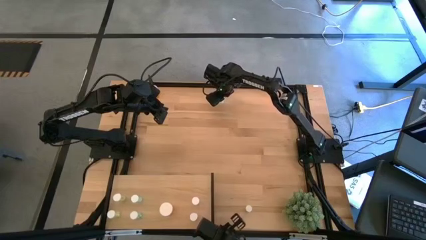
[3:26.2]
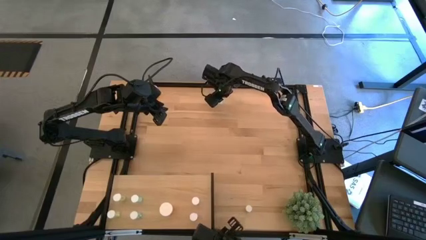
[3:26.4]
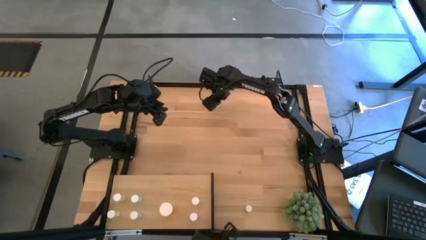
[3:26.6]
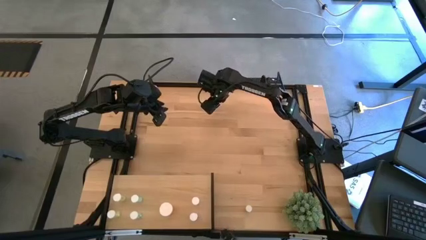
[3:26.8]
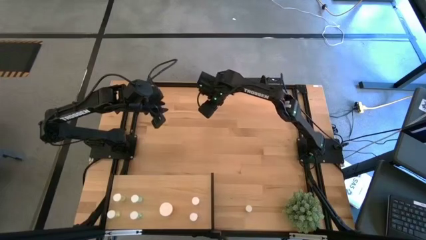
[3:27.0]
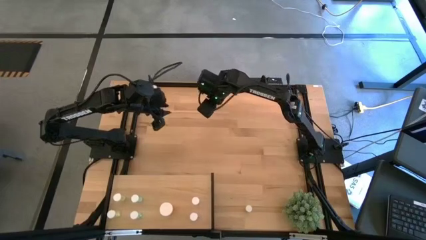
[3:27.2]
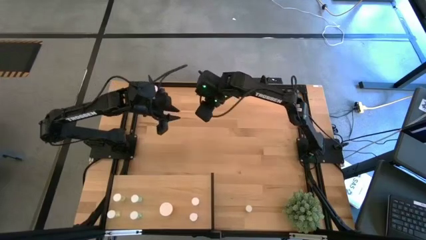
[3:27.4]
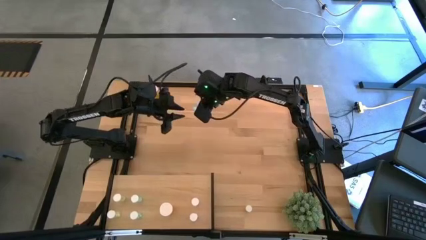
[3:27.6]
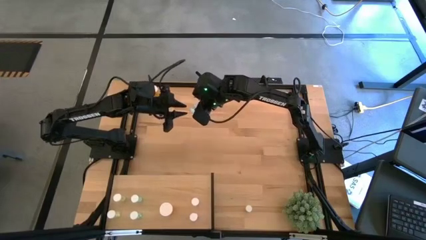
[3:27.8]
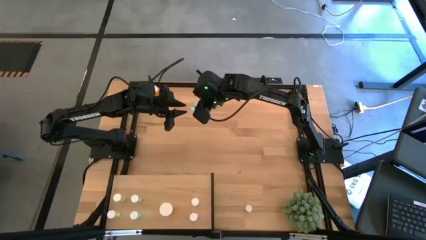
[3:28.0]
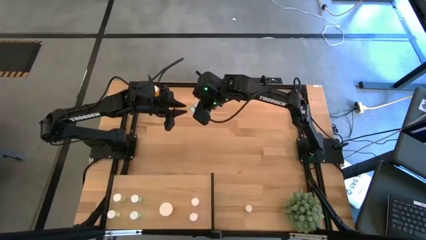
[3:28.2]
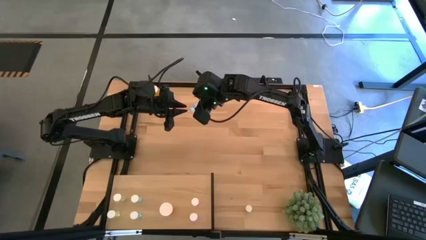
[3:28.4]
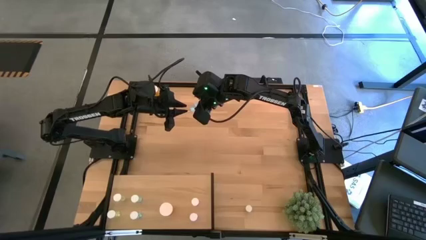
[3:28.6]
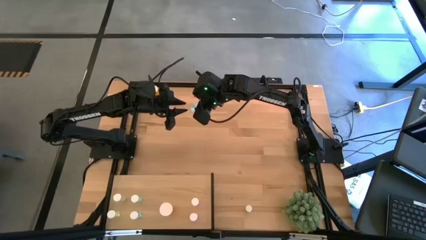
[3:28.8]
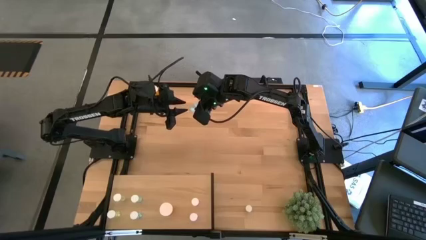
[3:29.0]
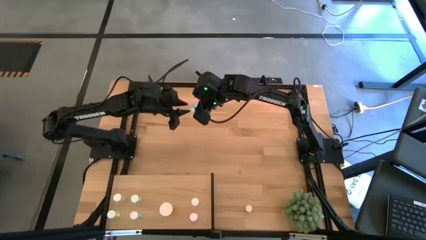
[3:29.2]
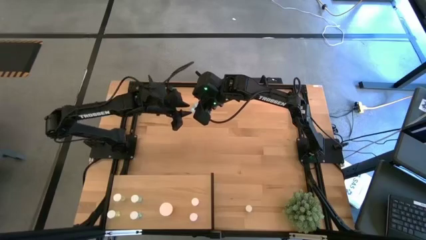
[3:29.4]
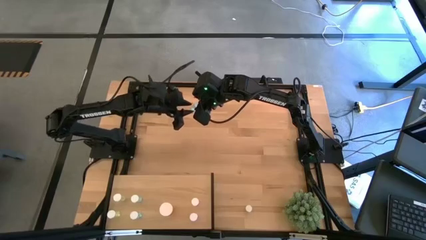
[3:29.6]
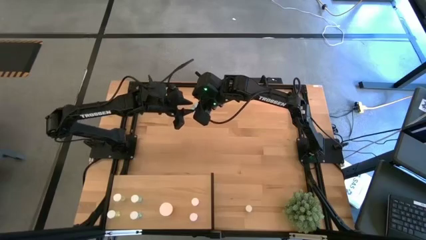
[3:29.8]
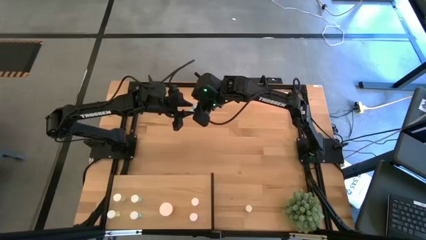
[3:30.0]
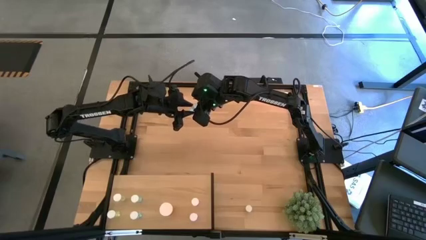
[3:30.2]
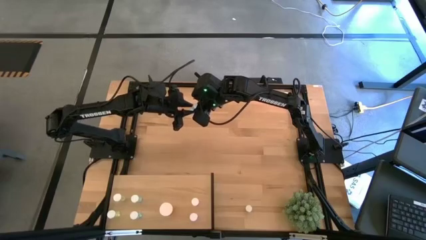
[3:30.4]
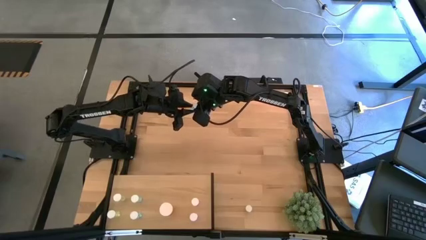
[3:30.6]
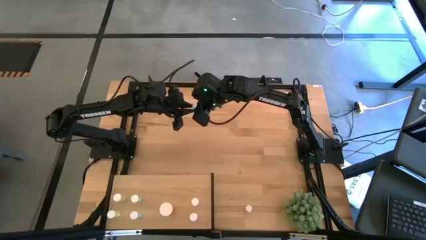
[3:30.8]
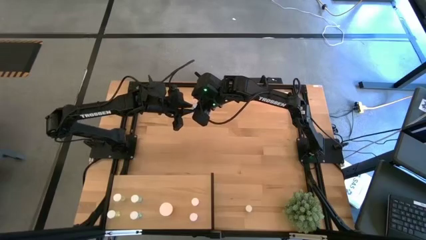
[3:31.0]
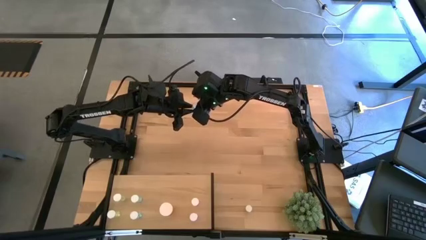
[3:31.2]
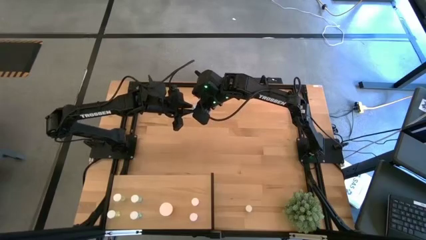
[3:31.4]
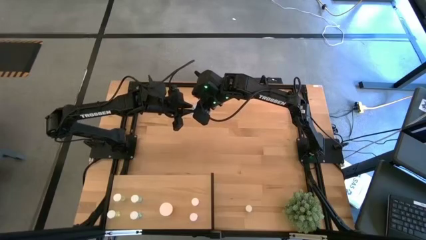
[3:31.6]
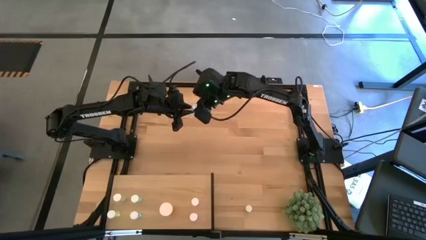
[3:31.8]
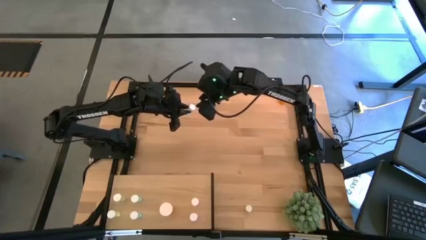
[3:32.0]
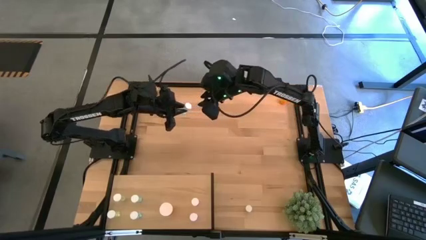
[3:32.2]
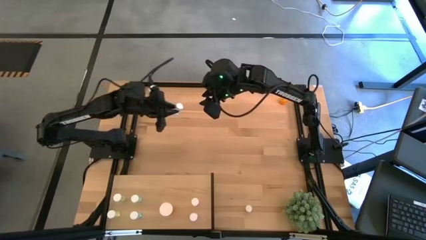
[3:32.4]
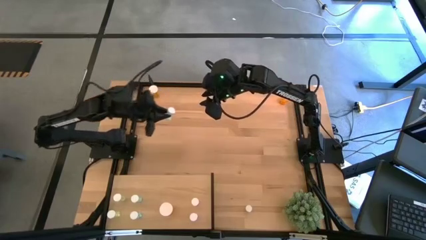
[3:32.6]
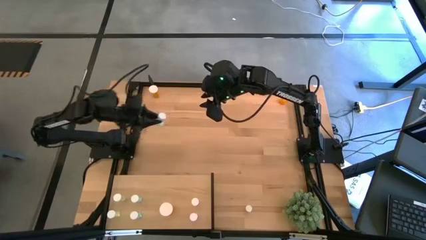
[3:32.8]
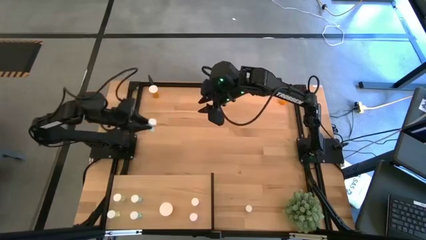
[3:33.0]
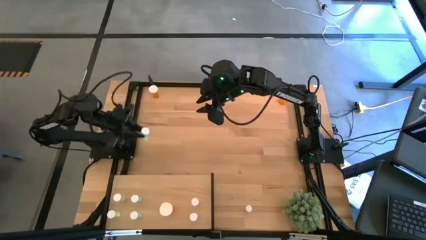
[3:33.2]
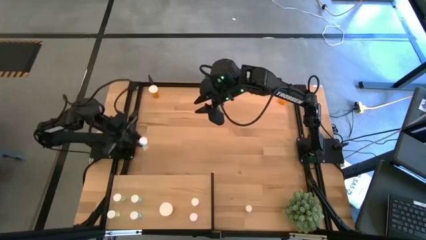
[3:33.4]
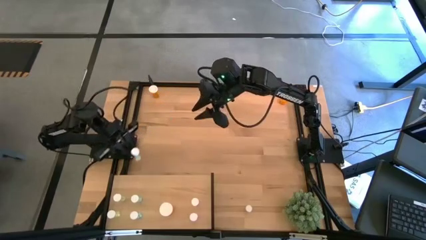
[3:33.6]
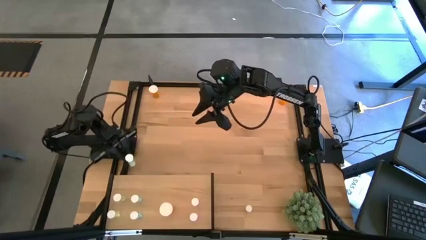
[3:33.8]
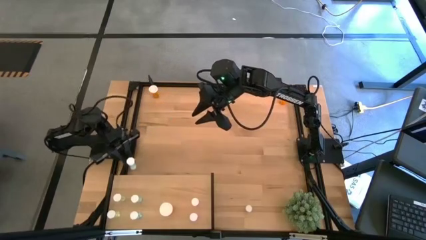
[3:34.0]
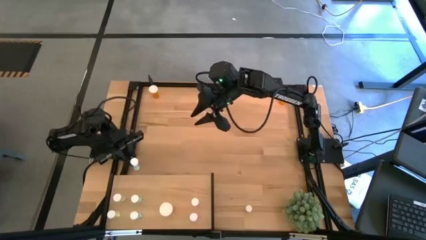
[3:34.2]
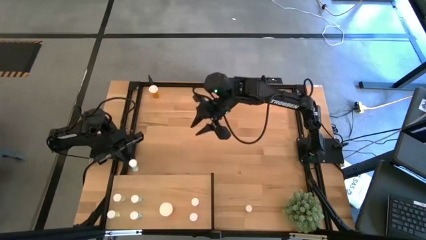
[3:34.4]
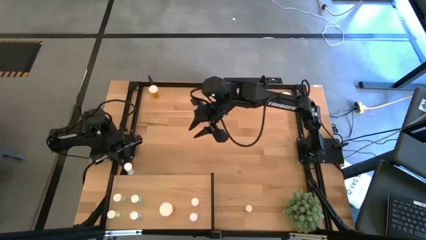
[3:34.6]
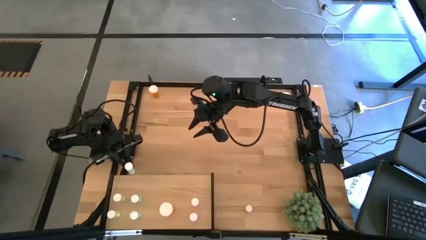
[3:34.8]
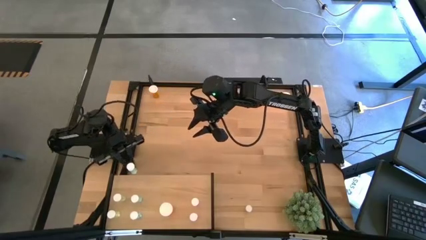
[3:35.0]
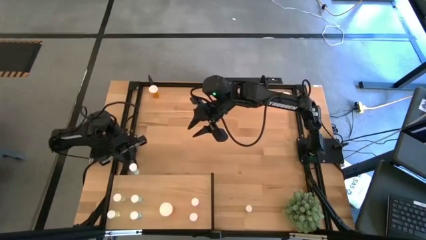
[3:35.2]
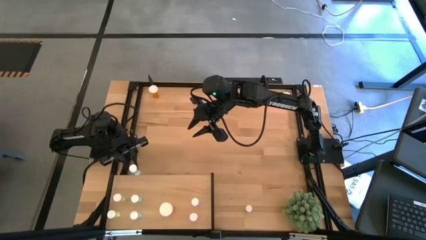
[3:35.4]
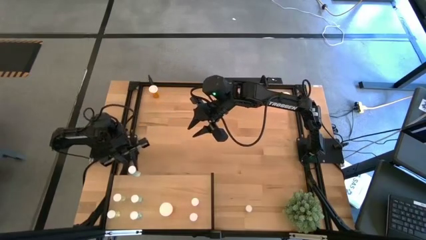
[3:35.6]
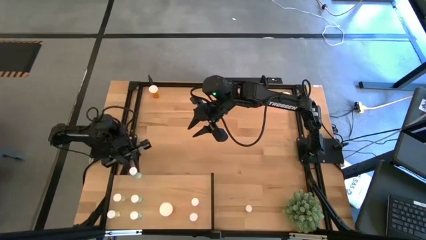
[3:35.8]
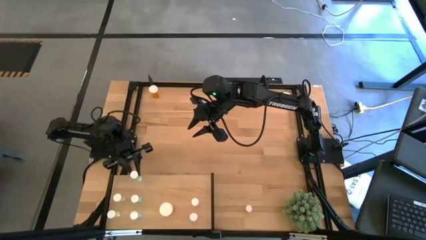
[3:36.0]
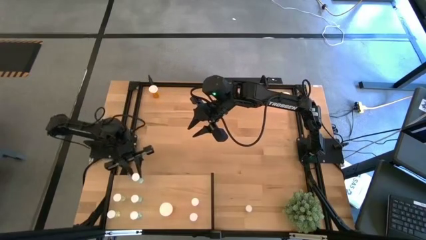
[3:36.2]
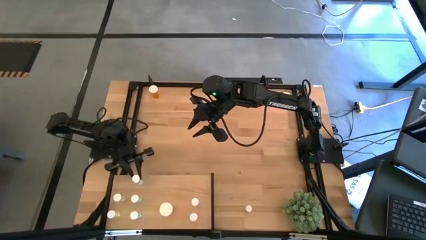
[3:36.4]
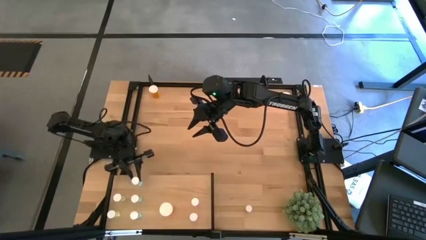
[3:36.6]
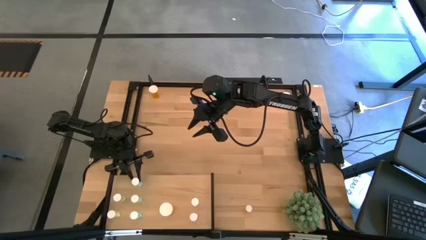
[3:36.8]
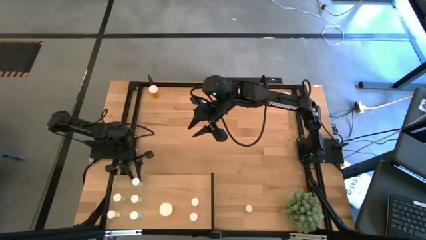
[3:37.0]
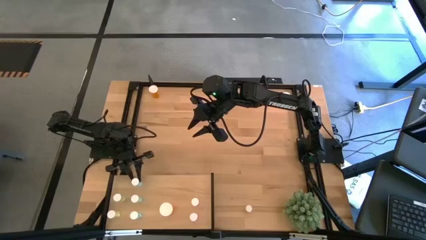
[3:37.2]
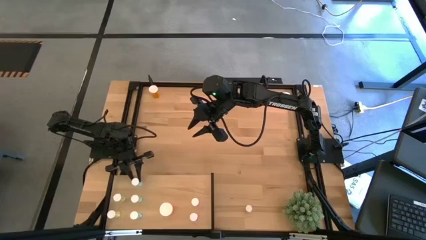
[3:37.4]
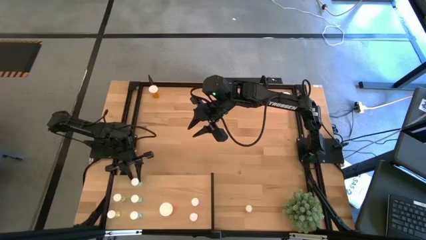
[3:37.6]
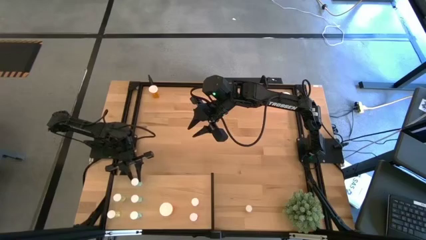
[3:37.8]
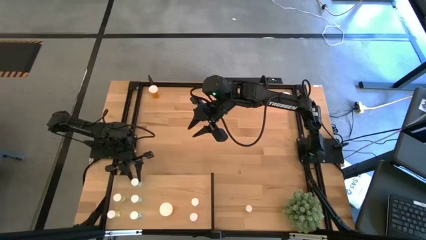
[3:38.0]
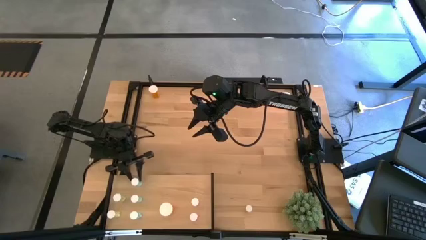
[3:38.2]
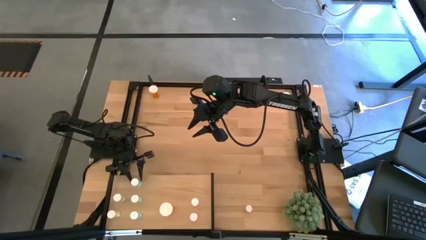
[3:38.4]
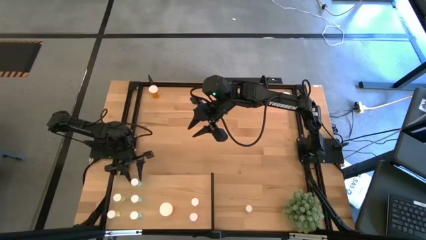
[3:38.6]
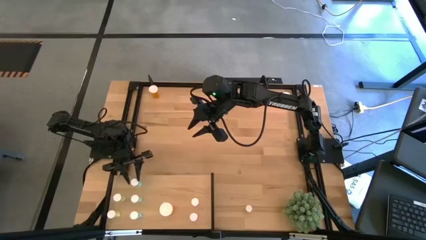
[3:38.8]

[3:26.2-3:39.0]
Task: Pick and place medicine bottles onto shelf by color
Put the blue pill bottle on the shelf aligned with the other blue pill bottle

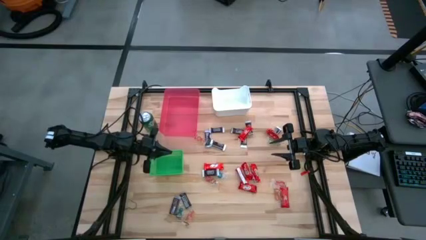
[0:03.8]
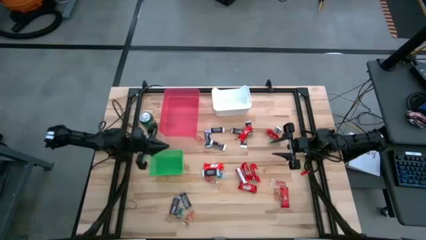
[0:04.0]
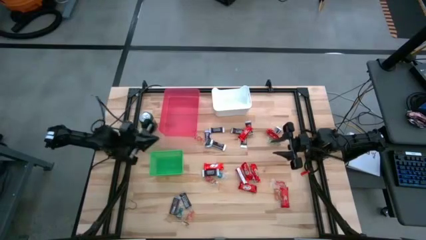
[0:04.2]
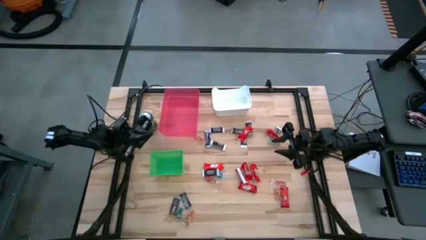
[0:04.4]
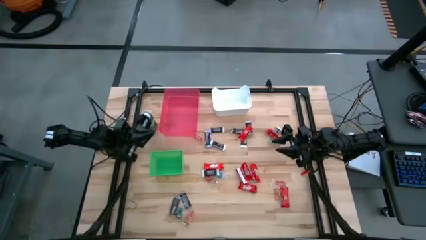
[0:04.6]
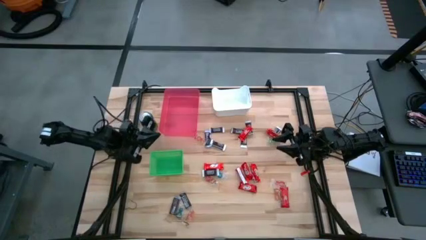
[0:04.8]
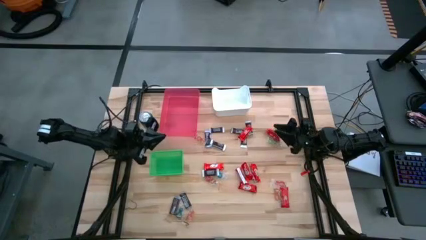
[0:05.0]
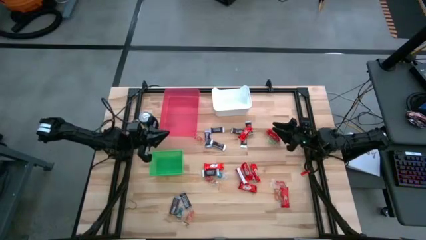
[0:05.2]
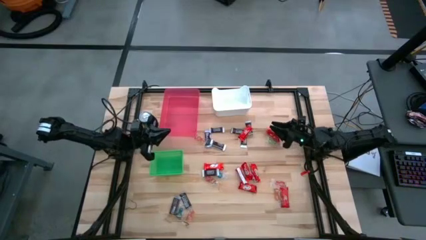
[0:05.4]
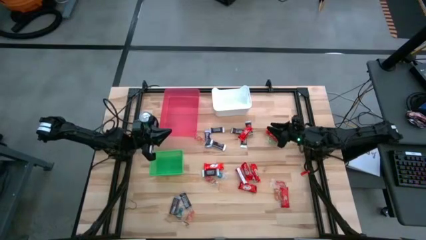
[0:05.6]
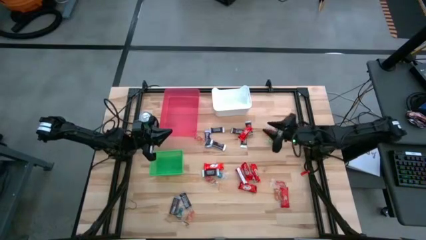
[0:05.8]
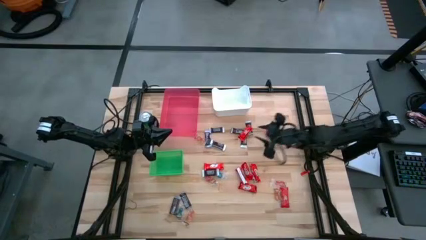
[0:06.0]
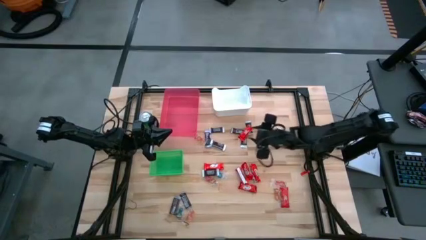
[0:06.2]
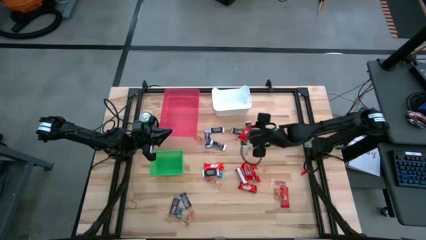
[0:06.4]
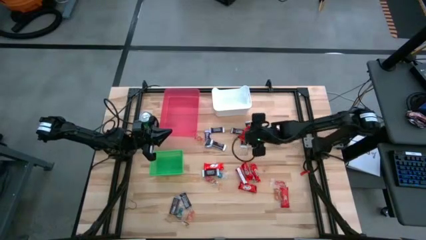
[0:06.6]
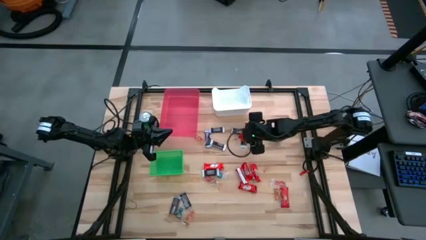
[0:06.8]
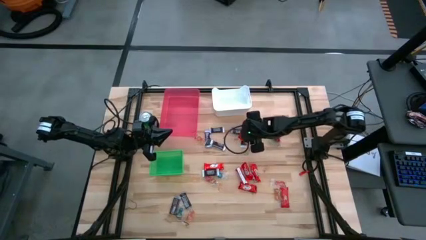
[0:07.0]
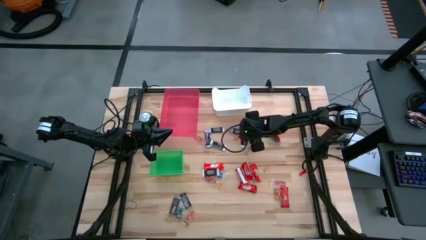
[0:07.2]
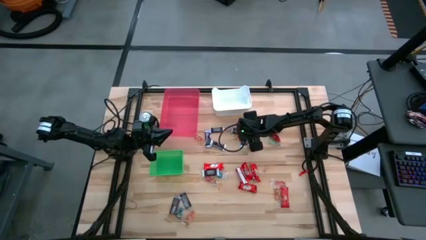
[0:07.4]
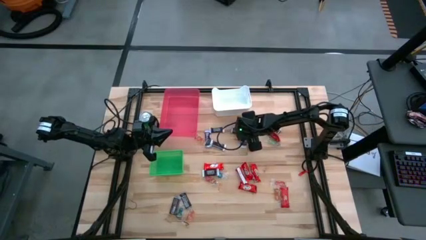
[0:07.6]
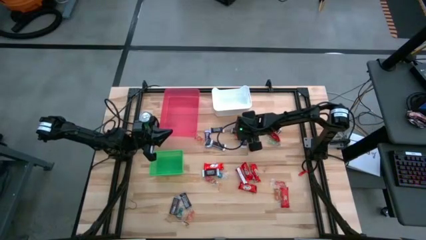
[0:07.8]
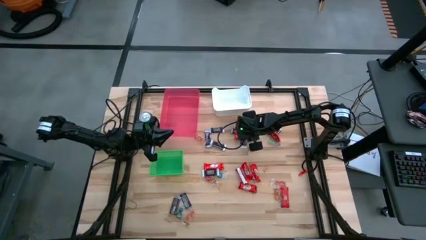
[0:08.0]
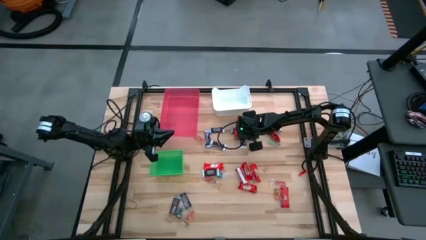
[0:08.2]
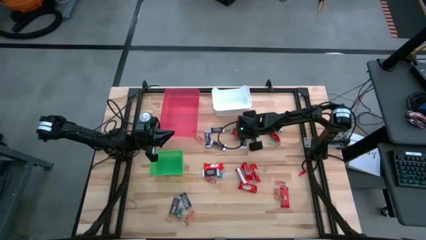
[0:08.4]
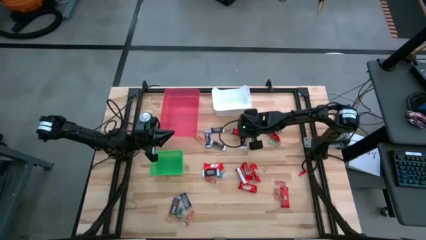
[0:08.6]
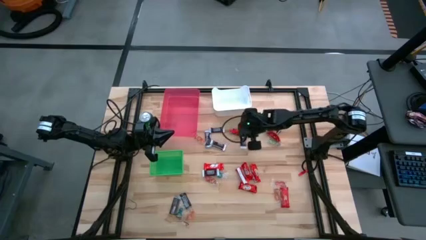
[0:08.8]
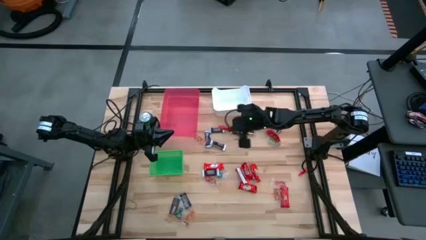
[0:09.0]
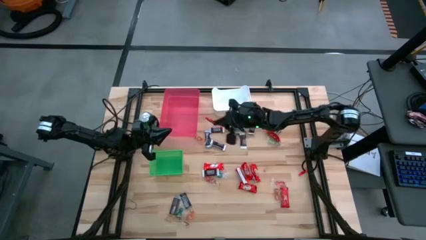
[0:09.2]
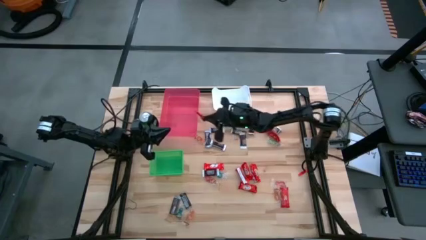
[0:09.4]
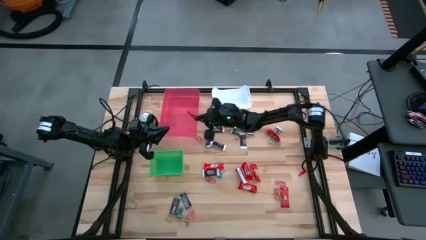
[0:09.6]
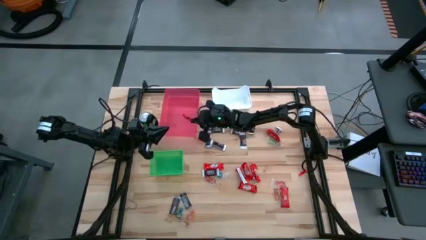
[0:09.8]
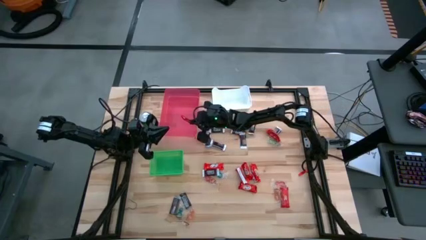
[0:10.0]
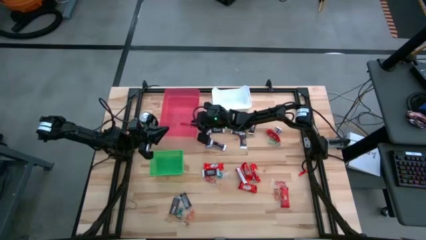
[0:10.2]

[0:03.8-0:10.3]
Task: Organize candy in baskets
Put the red chocolate into the pink bin
